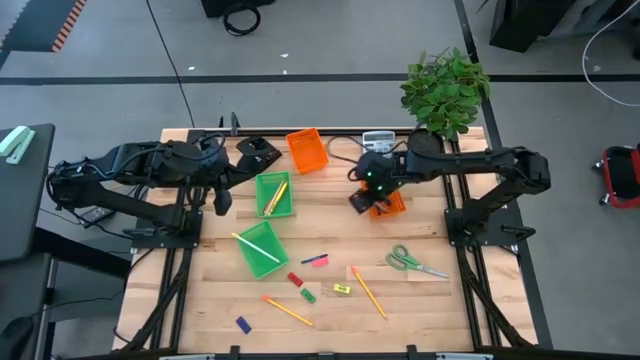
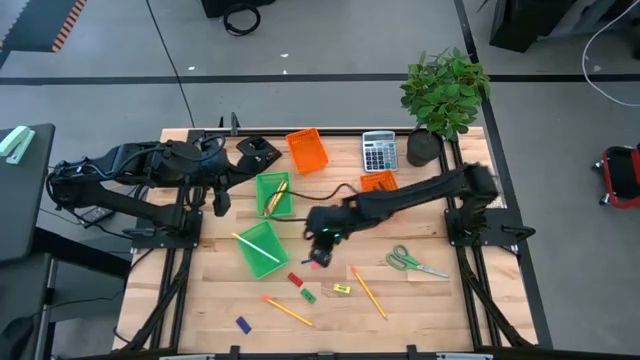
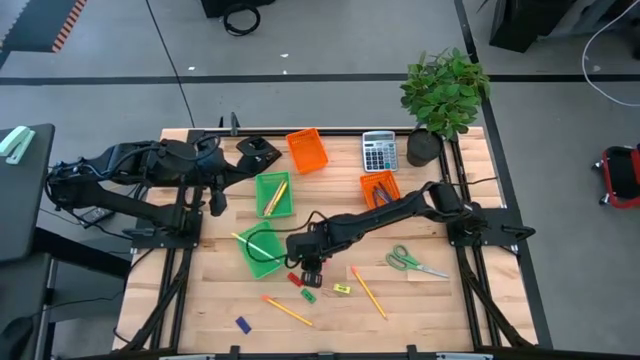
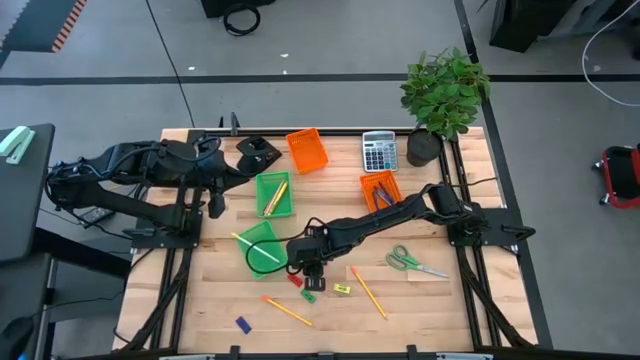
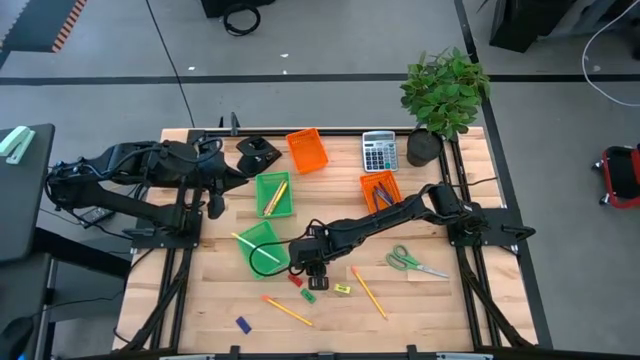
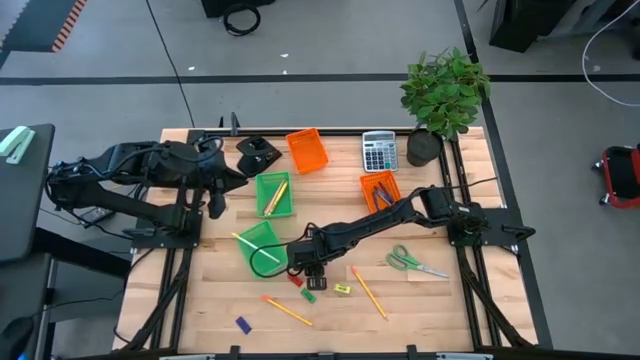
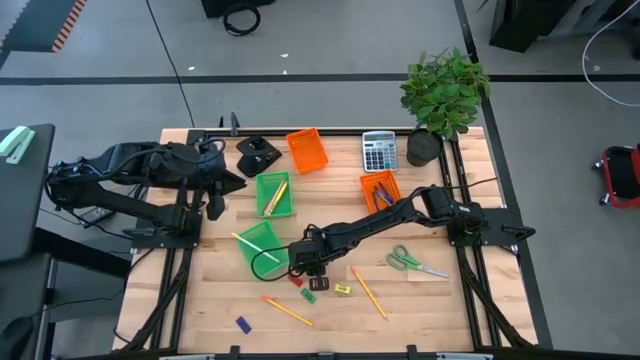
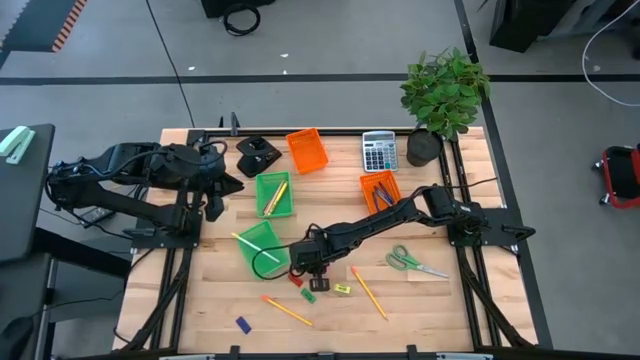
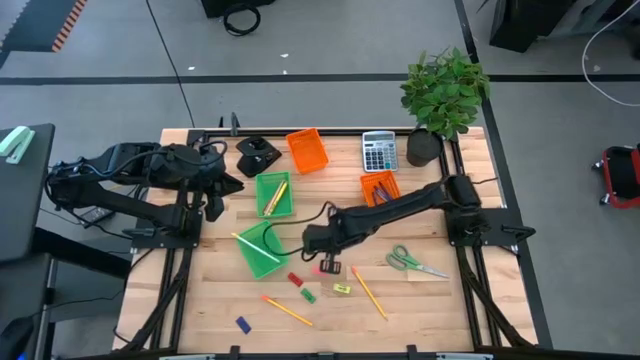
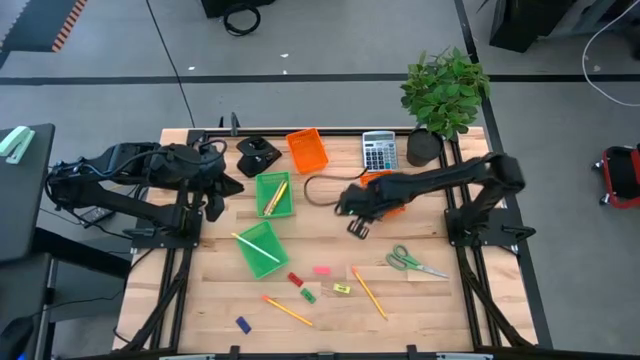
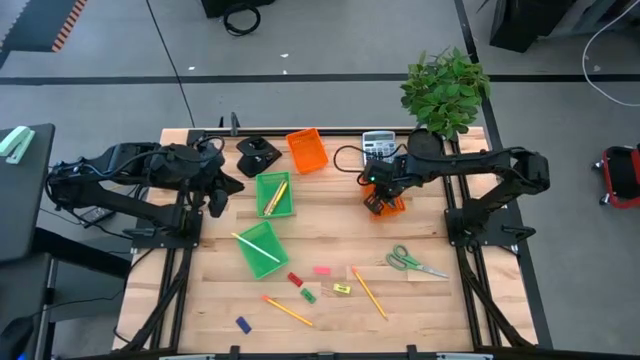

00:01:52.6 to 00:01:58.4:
Task: Sort crayons/erasers/pens/pencils in bins
Put the blue crayon into the bottom orange bin

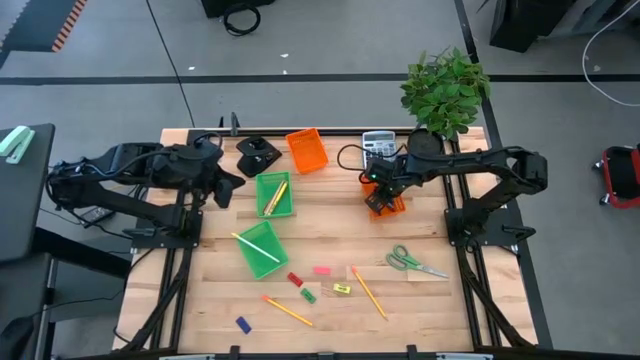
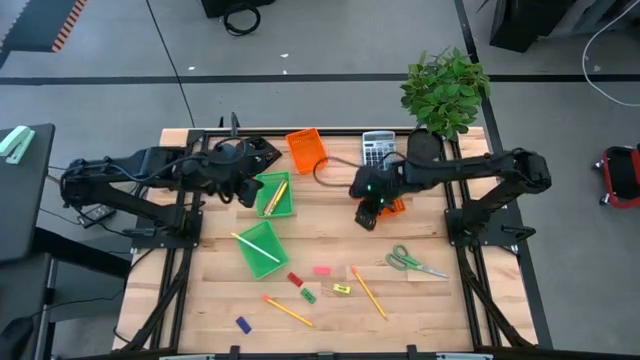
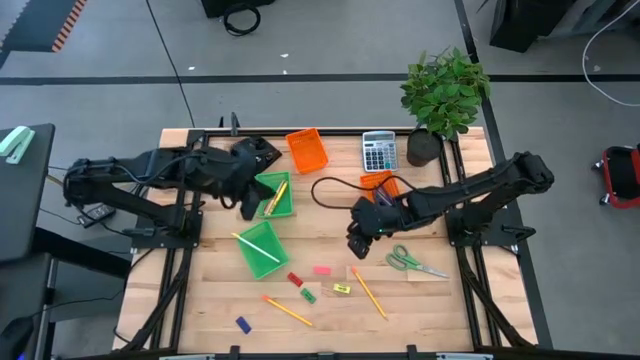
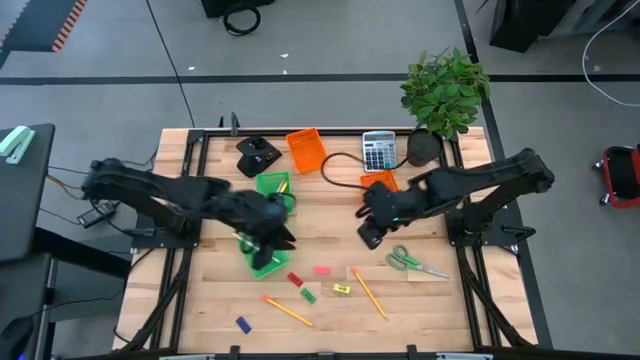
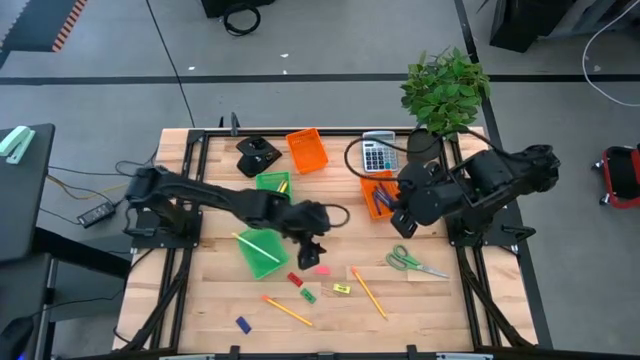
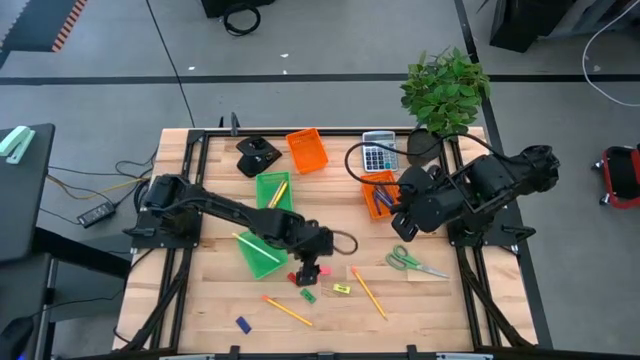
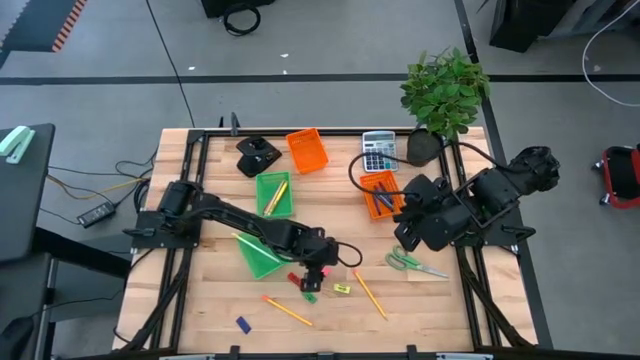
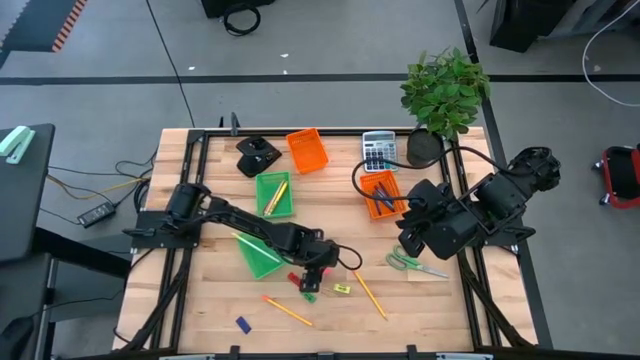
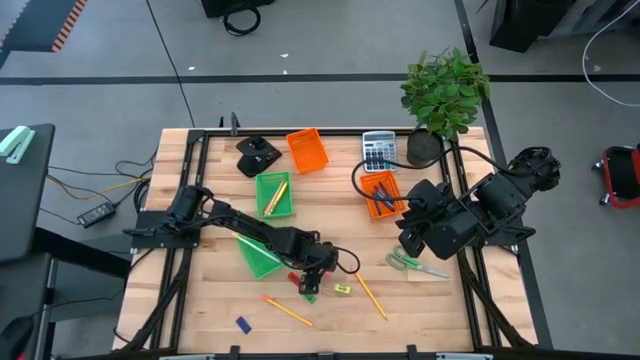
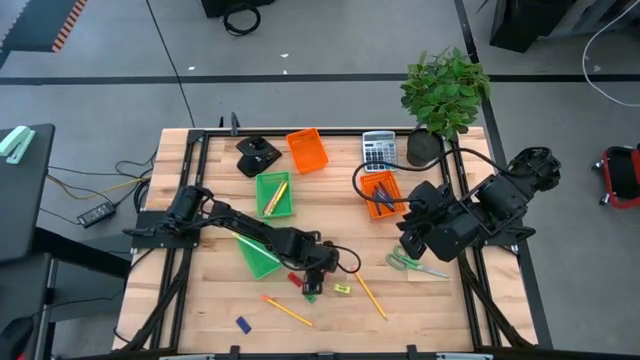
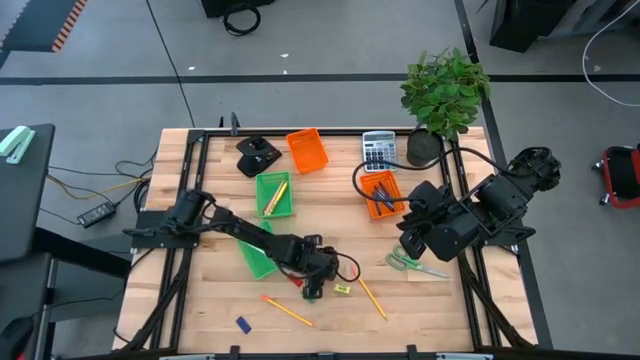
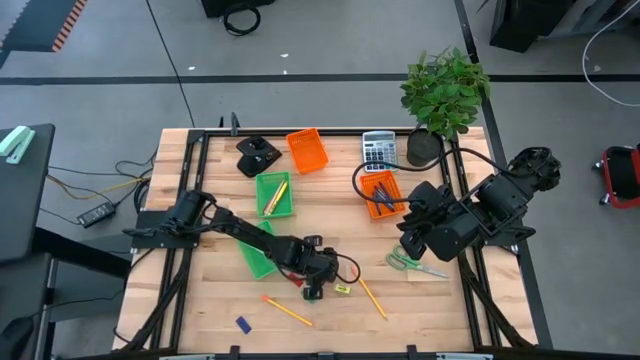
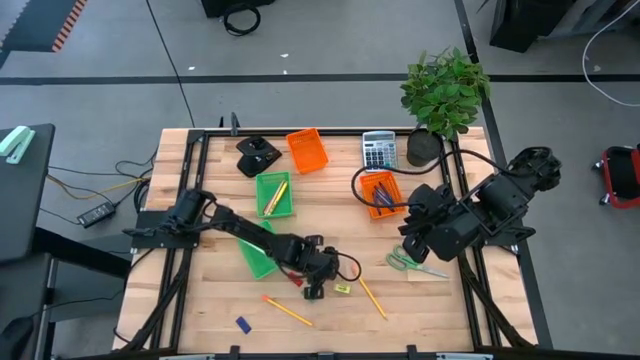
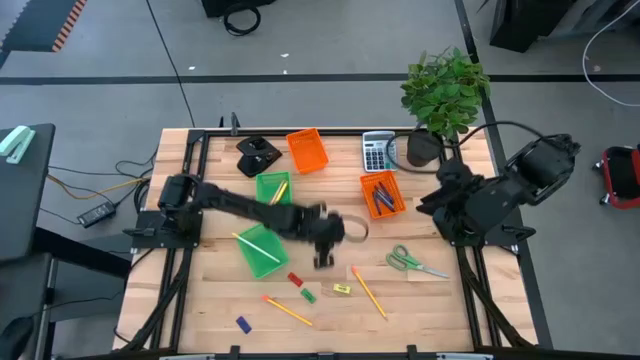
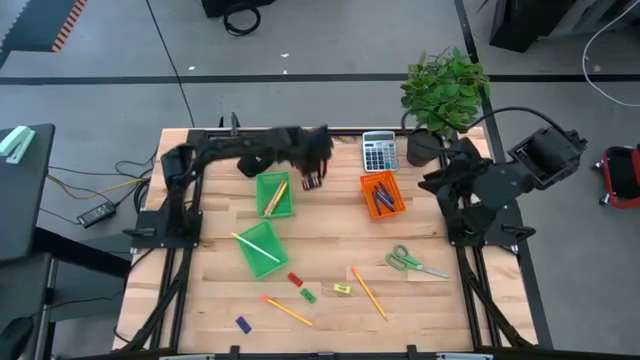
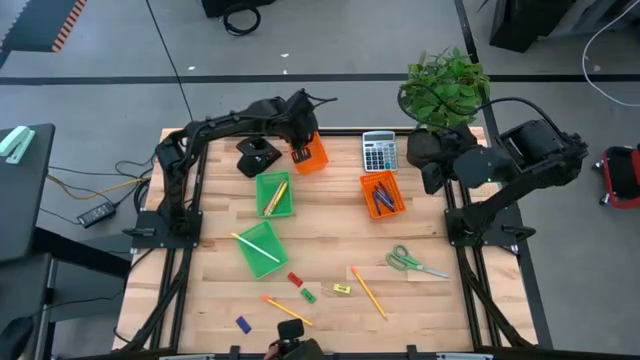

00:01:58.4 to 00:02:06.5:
Put the pink eraser into the top orange bin

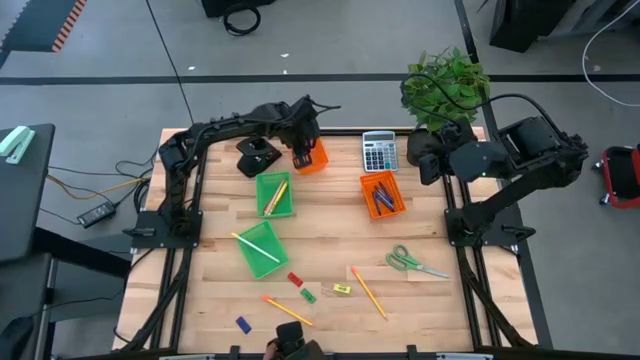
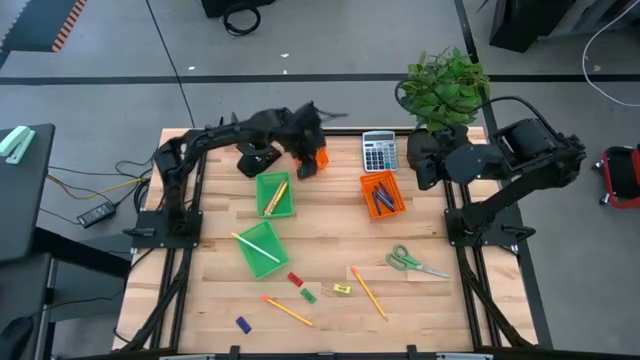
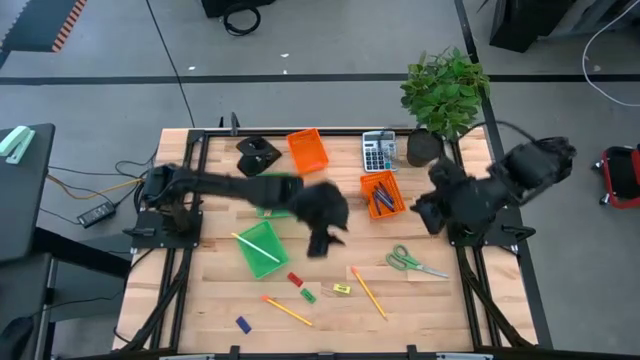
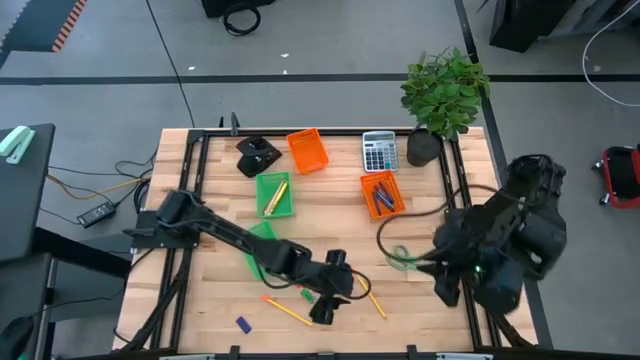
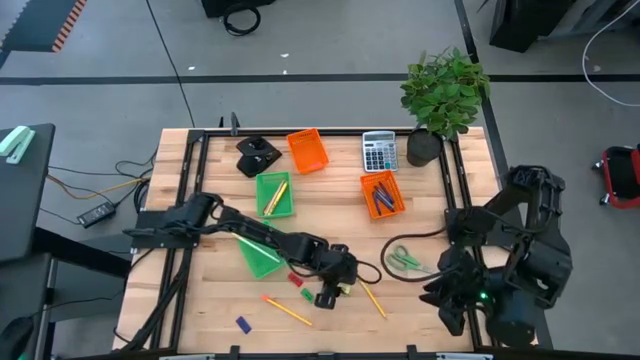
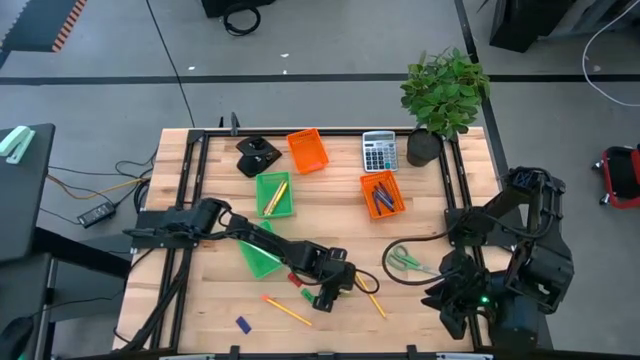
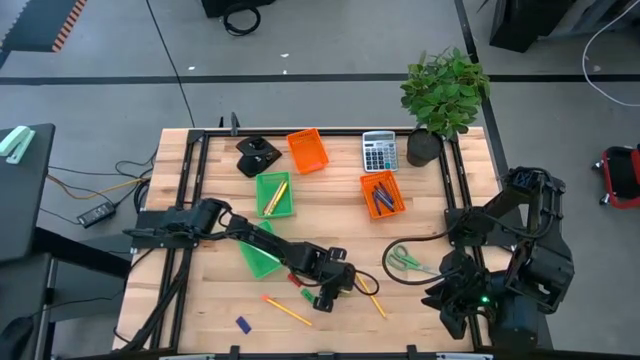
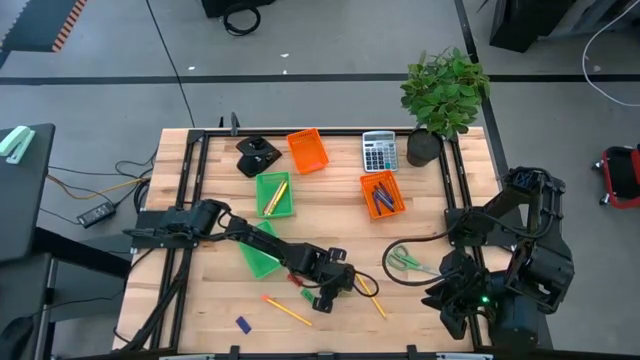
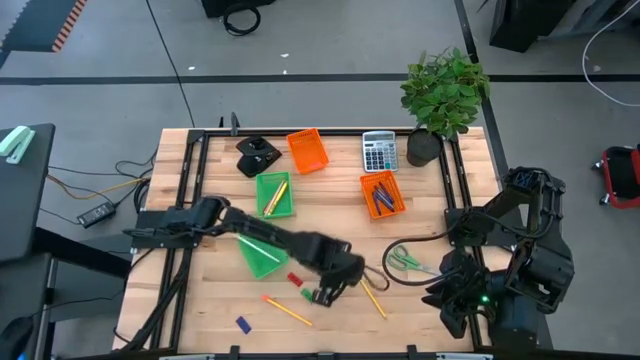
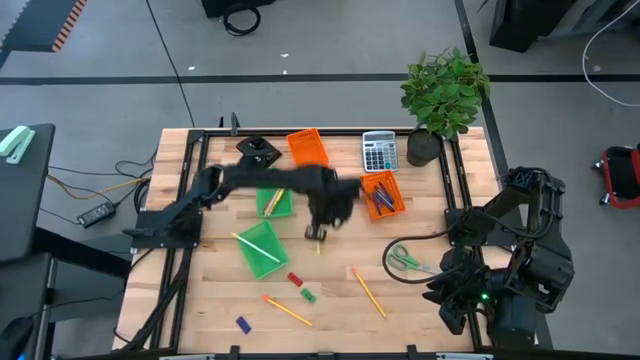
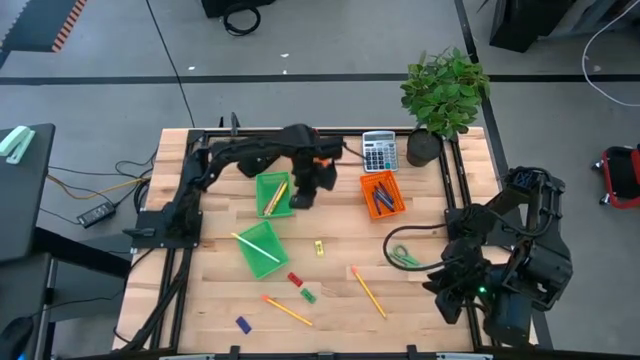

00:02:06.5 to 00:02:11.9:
Put the yellow eraser into the top orange bin

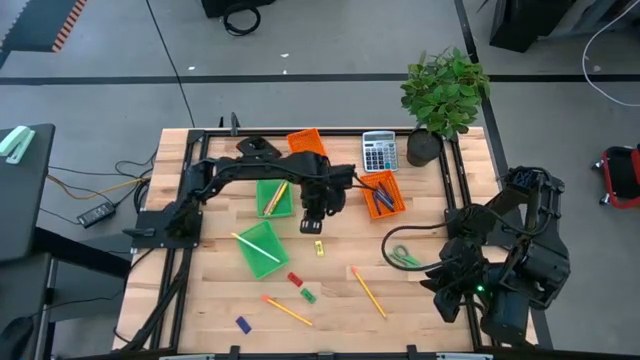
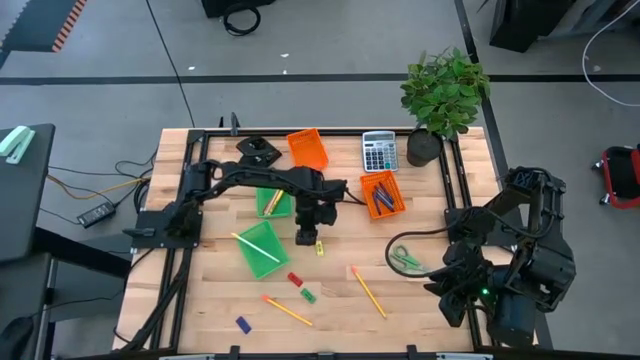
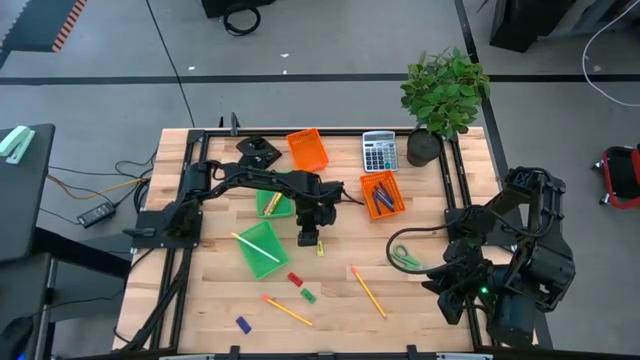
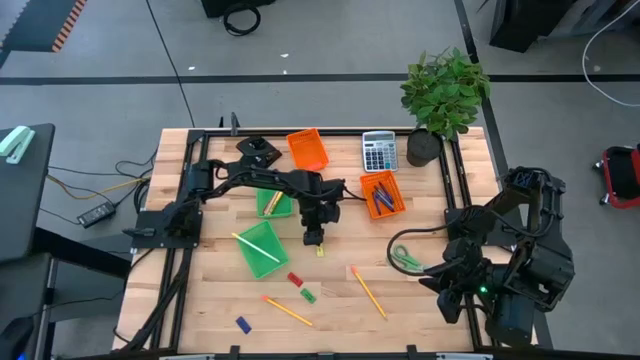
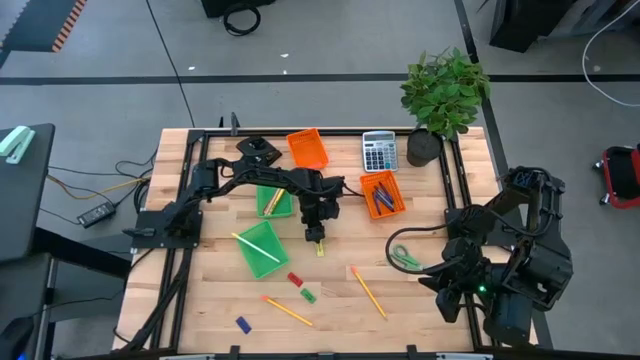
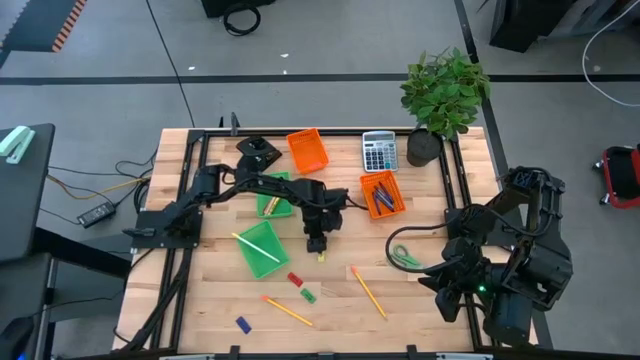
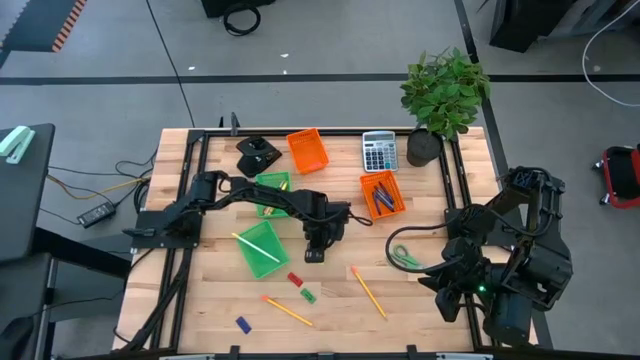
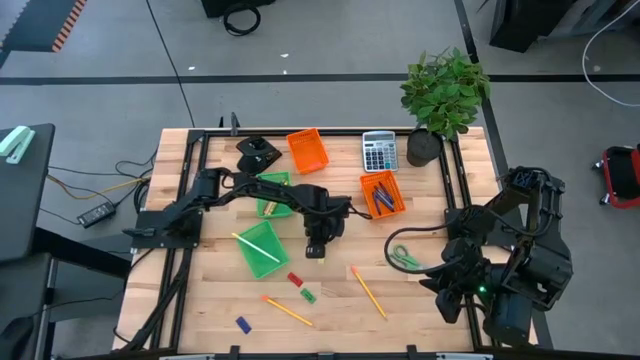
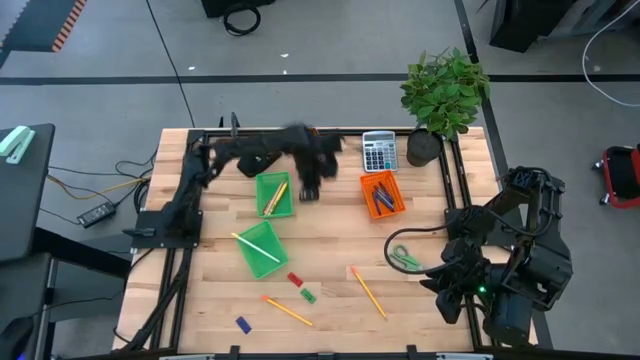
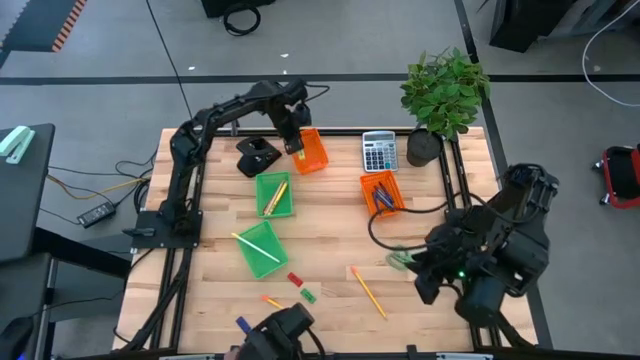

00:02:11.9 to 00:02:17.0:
Put the yellow eraser into the top orange bin
